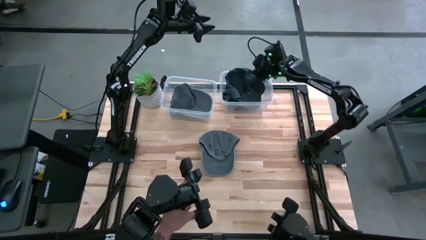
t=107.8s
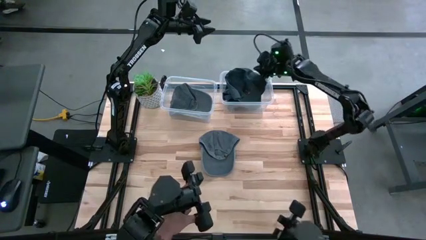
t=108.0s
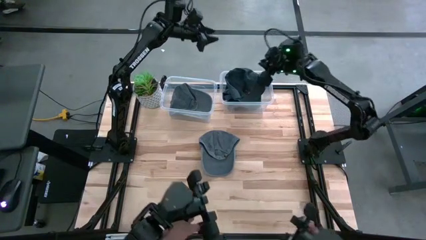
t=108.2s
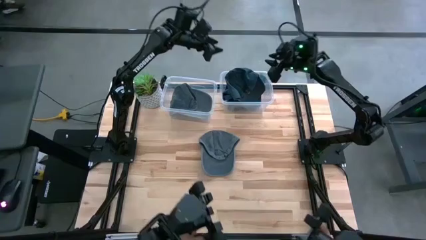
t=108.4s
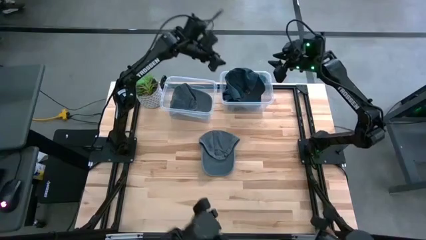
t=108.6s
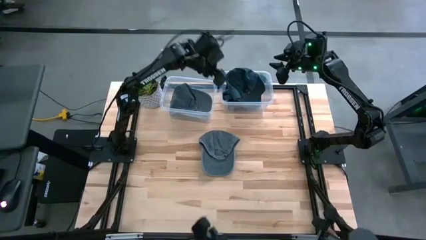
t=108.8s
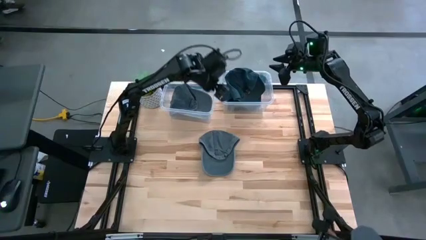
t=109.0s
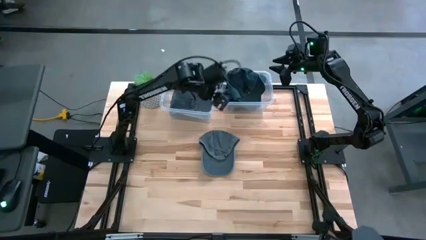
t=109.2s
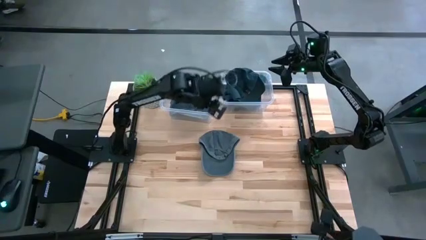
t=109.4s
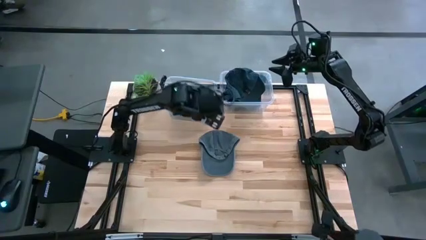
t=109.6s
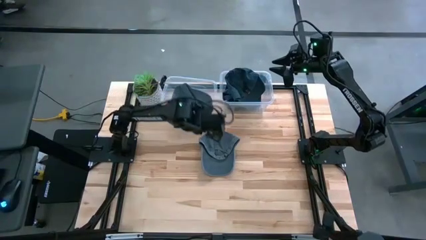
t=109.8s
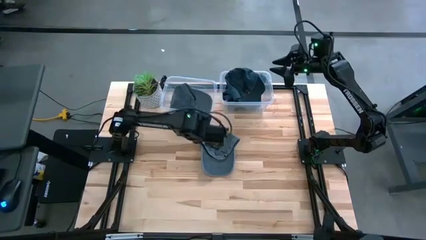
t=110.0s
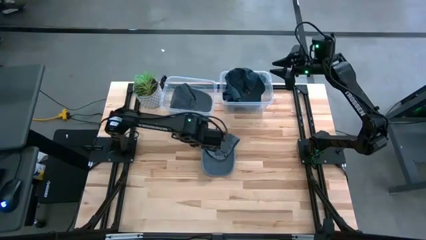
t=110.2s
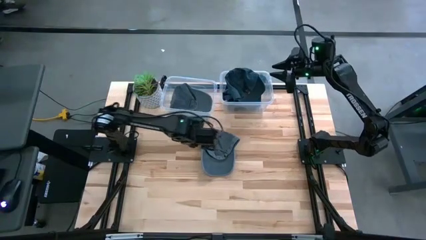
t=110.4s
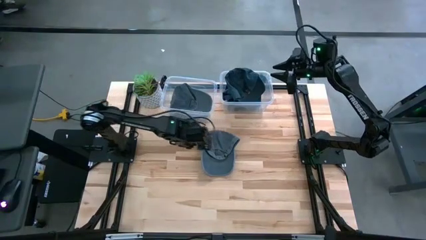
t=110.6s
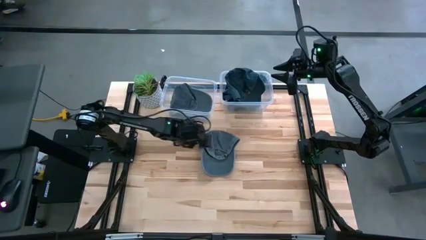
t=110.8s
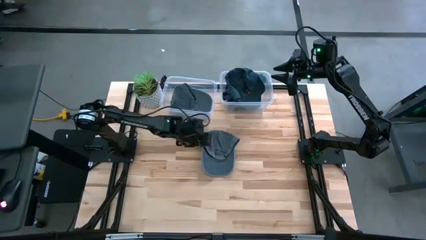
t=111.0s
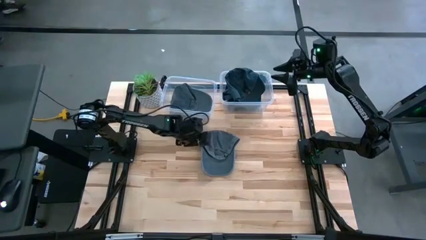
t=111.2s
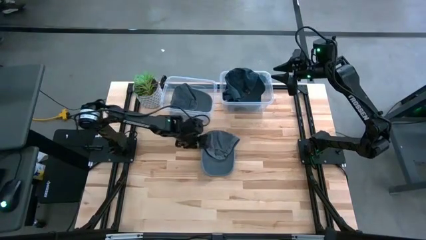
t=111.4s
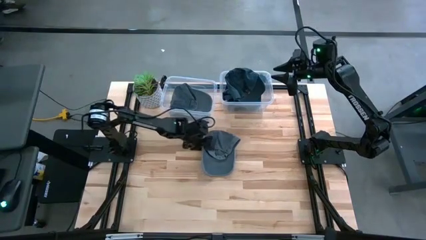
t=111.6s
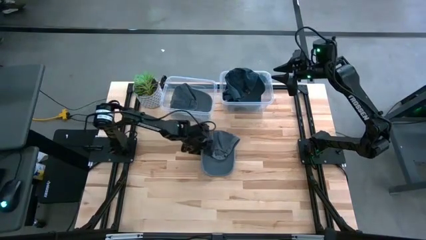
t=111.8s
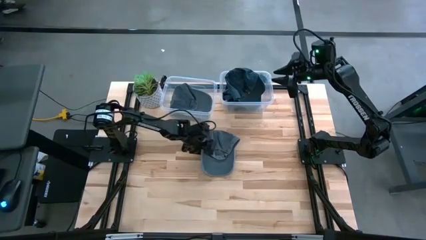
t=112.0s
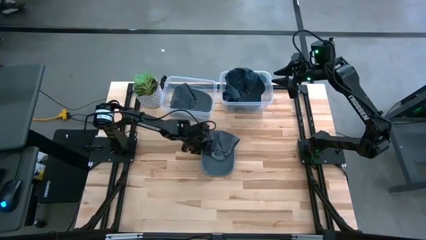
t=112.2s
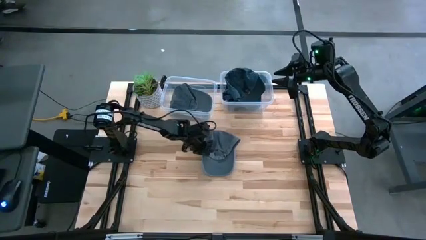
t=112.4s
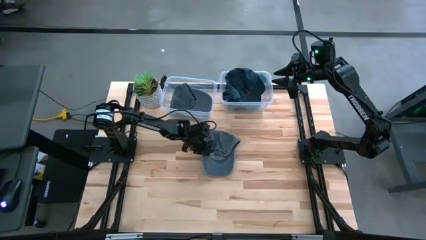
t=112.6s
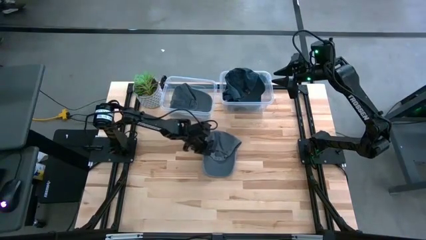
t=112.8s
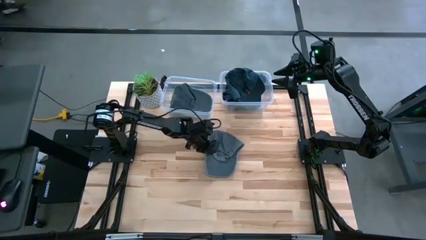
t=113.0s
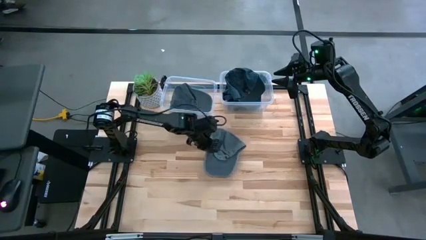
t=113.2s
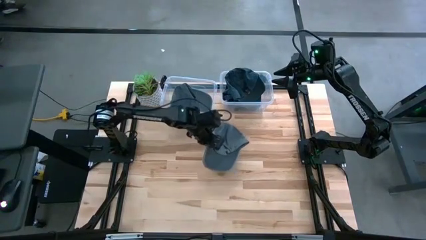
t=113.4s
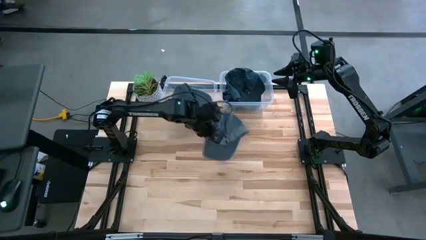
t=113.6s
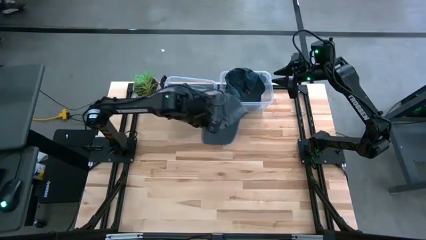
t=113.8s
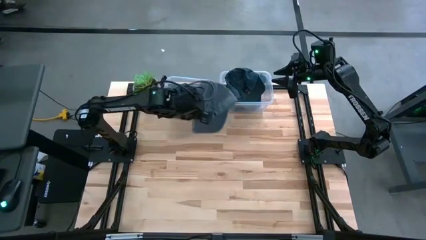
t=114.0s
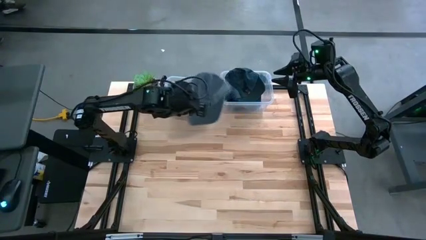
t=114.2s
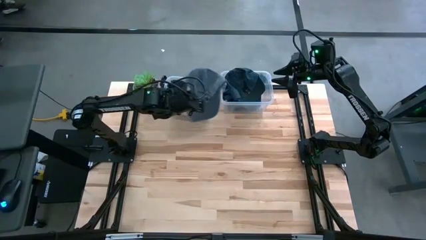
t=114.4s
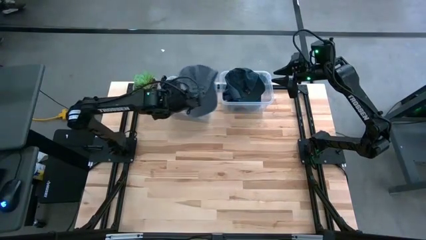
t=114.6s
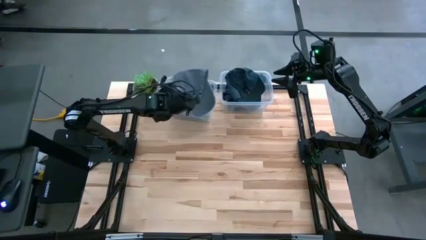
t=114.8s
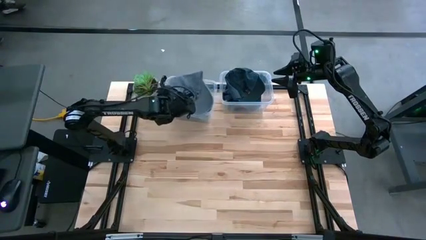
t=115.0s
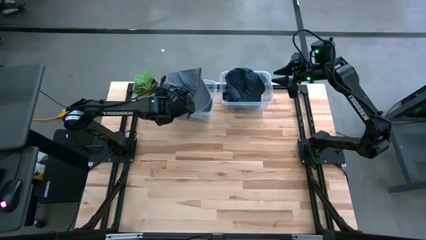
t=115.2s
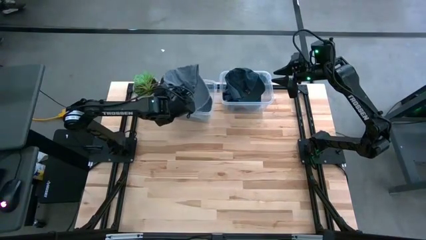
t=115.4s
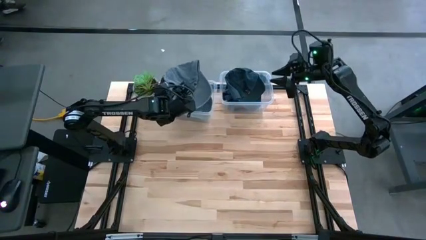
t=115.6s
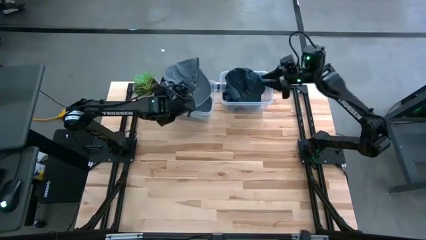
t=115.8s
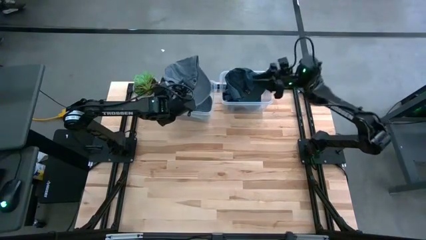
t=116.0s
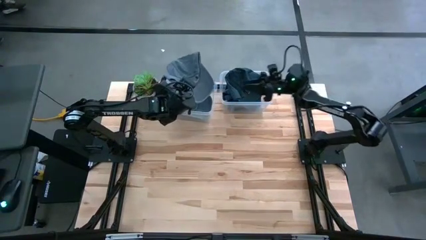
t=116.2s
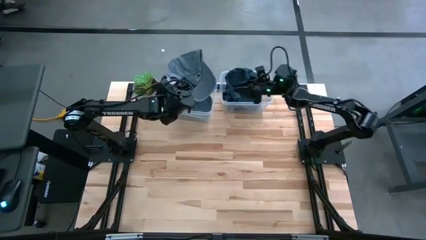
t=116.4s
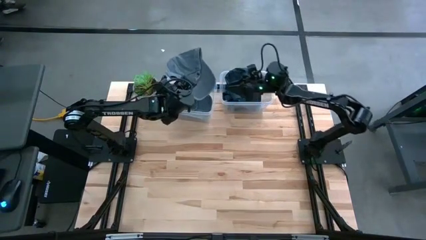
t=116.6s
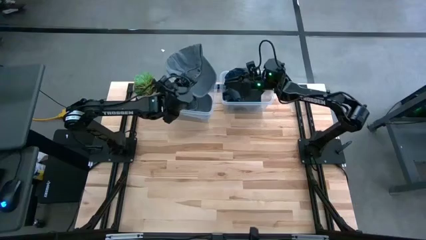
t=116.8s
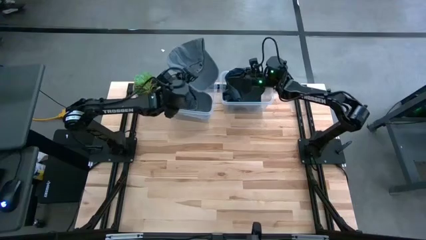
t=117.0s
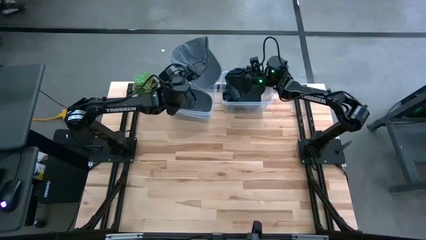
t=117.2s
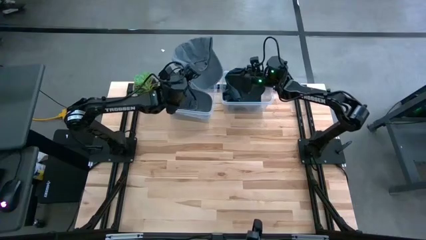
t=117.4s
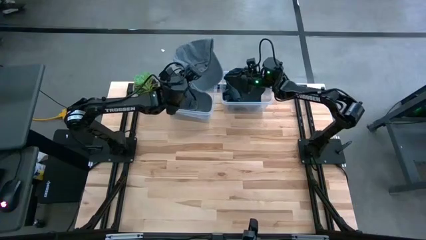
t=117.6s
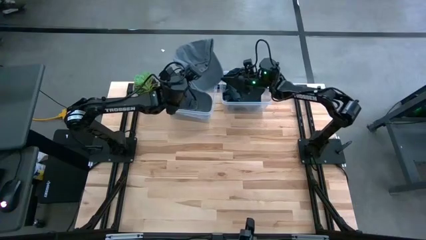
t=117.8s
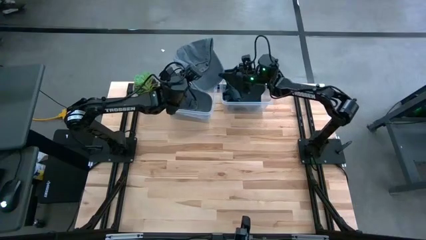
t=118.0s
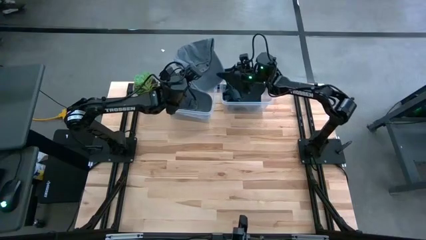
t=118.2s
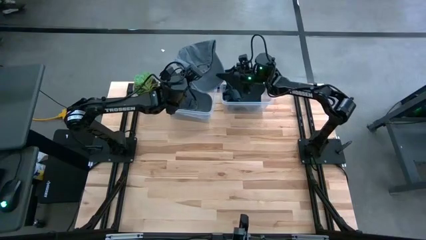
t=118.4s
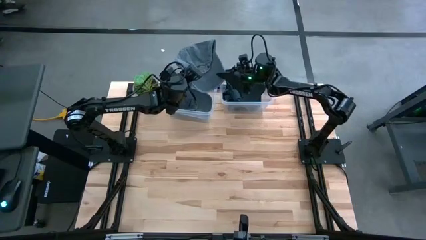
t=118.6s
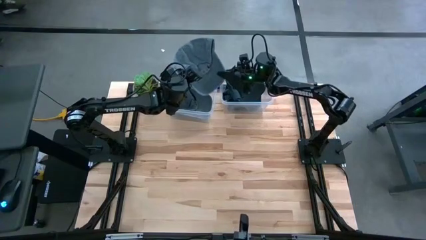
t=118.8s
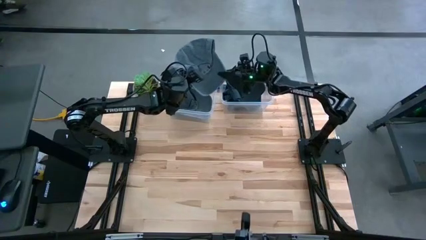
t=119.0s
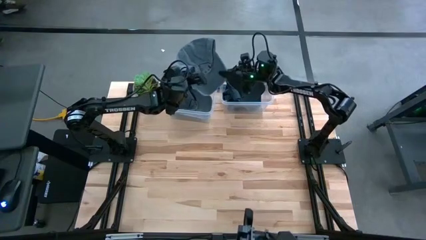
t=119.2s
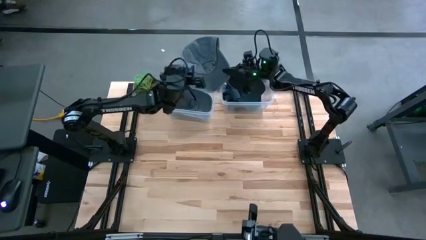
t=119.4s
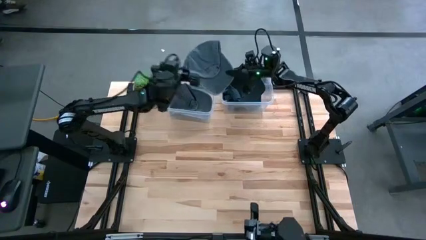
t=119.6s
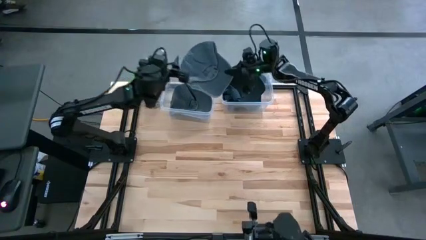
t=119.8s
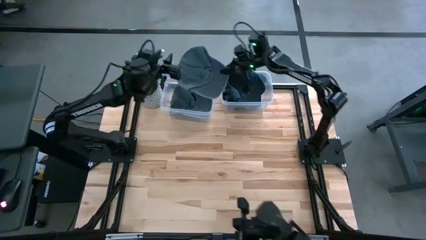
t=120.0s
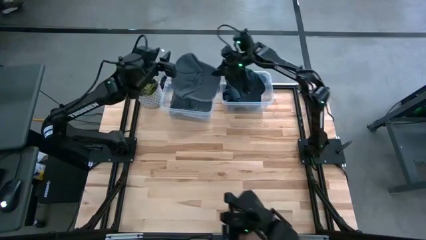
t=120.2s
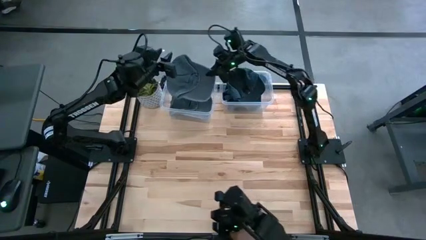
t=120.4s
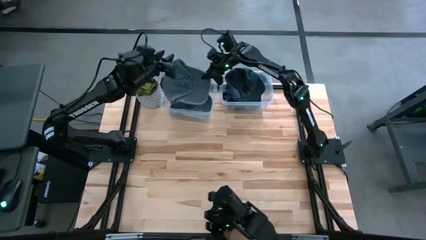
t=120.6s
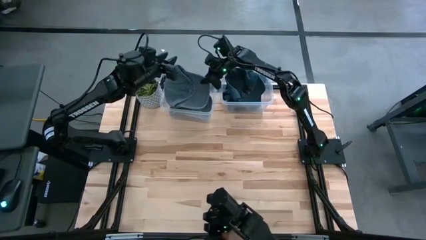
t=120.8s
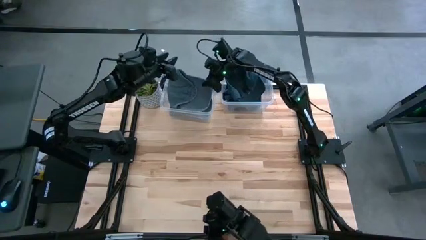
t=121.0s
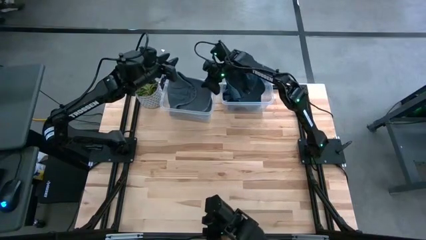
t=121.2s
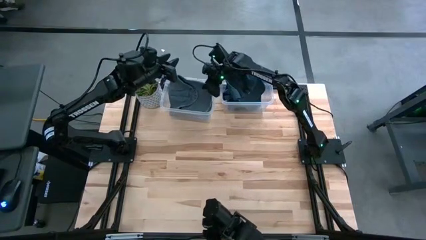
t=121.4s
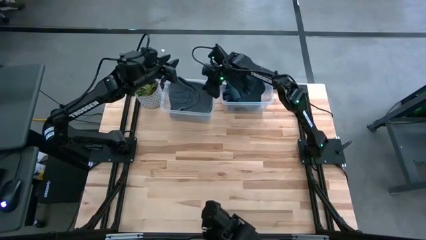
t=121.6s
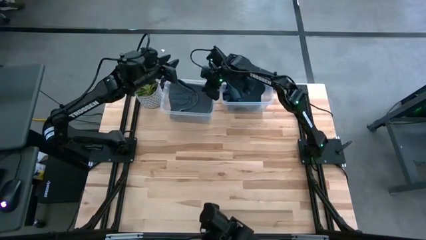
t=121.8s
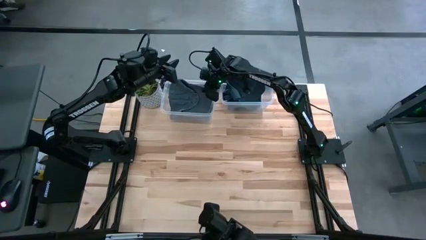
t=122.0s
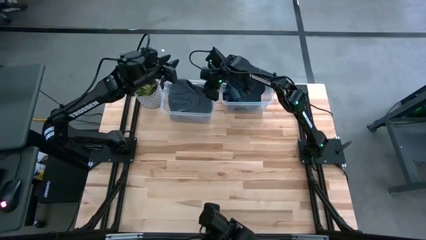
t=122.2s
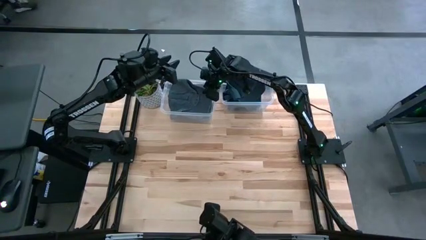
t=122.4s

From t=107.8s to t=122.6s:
Task: Pick & Place hat
Put the gray cap into the left transparent bin

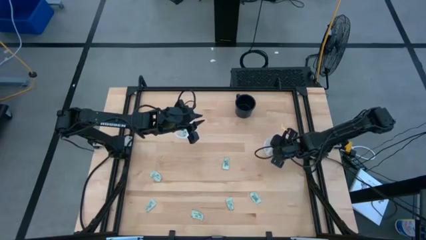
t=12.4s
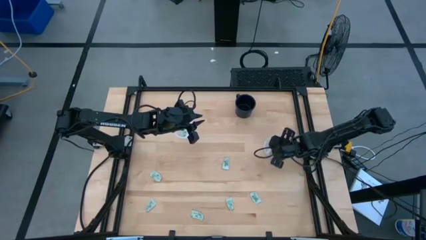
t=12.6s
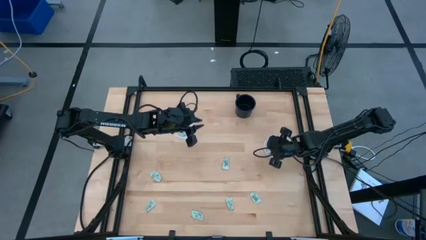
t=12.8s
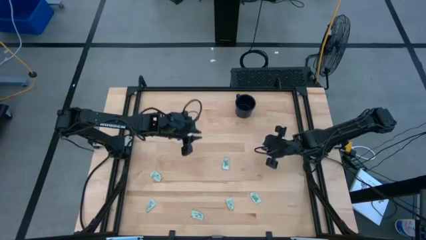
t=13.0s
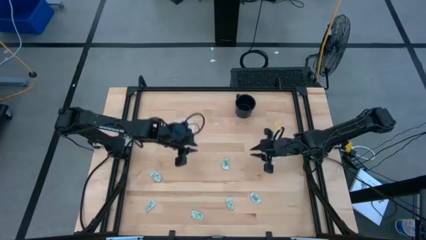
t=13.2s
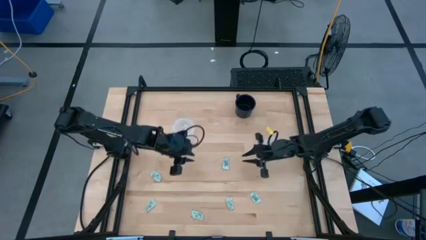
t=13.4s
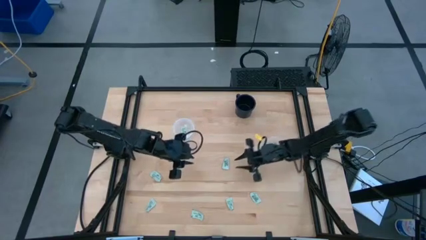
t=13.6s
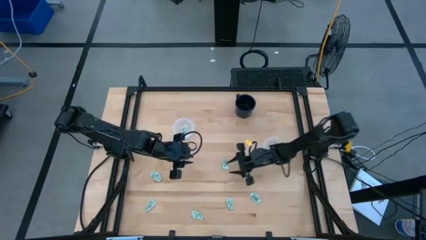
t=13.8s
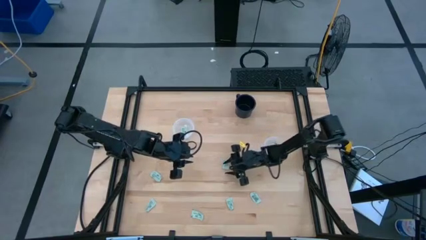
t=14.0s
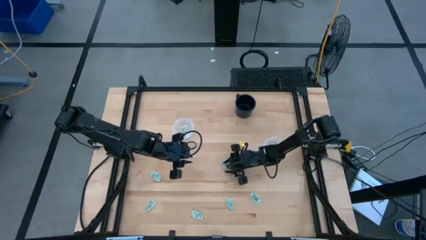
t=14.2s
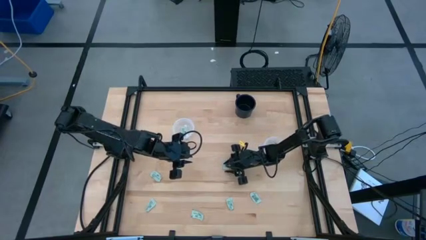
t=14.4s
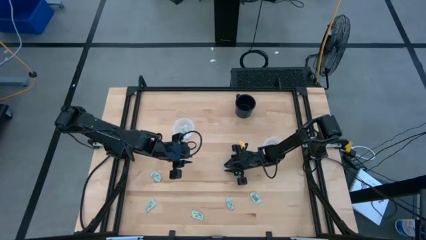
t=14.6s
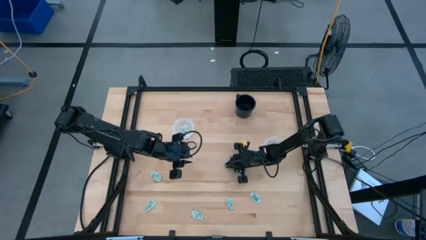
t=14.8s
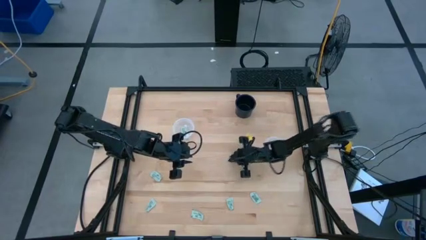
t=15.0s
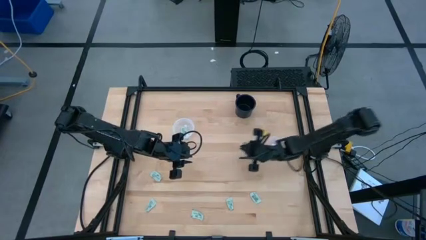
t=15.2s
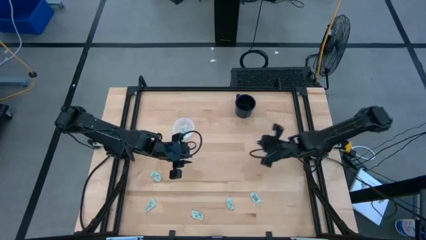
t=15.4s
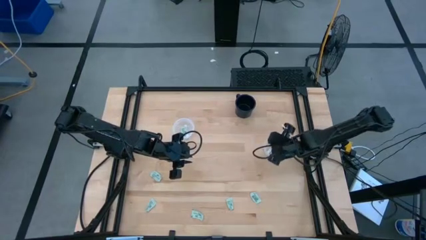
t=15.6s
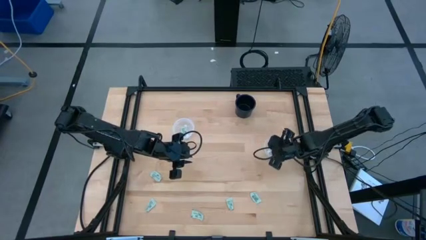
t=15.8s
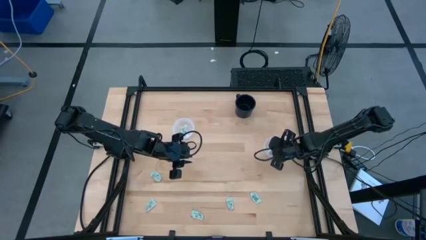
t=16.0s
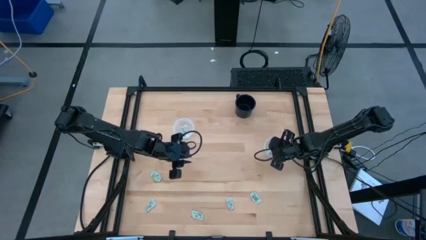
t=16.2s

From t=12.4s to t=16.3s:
Task: Pick and place items into bin
Put the white stevia packet into the right transparent bin
